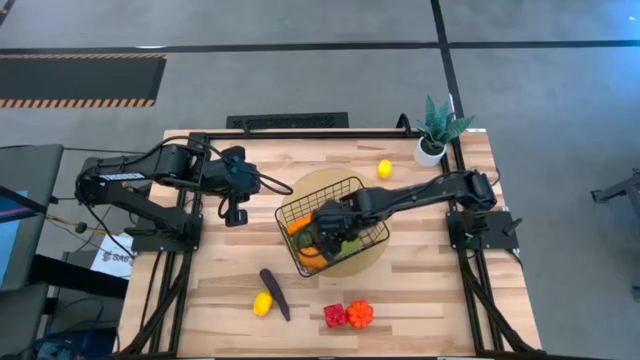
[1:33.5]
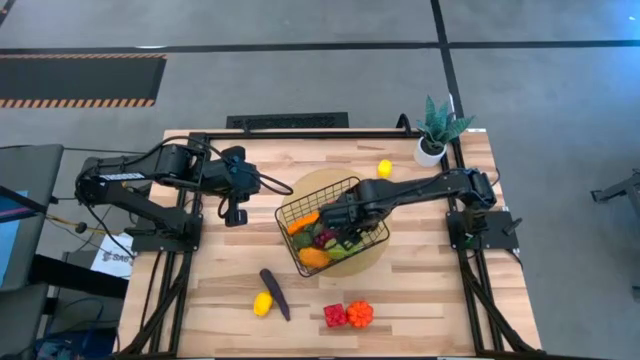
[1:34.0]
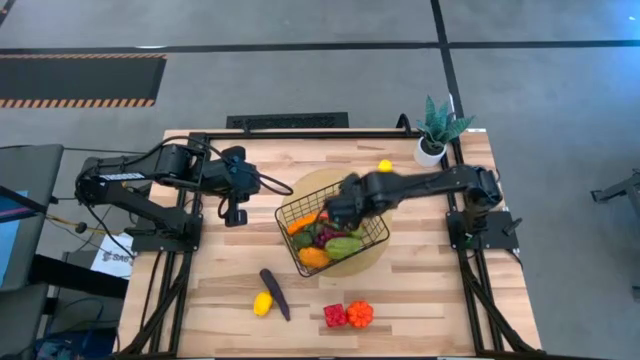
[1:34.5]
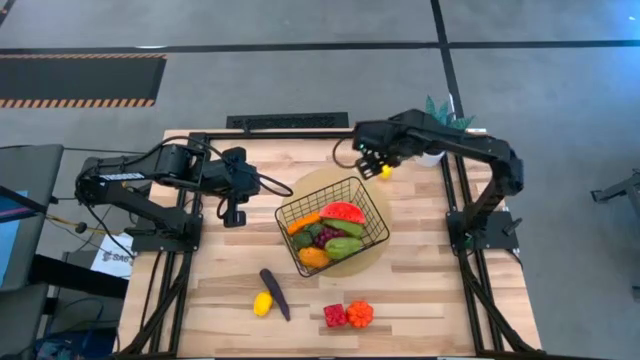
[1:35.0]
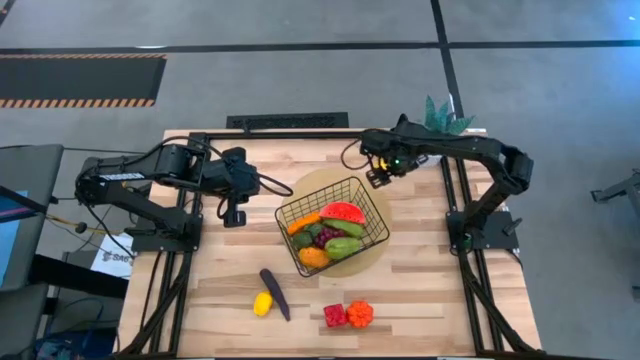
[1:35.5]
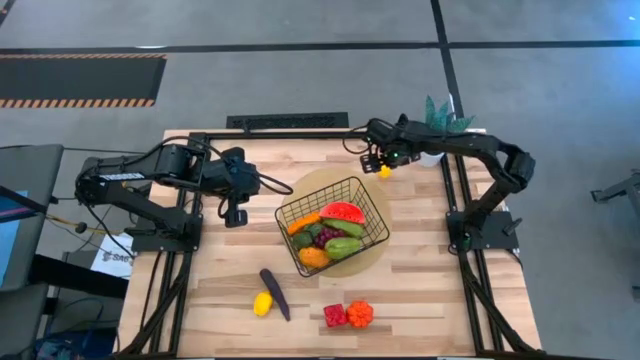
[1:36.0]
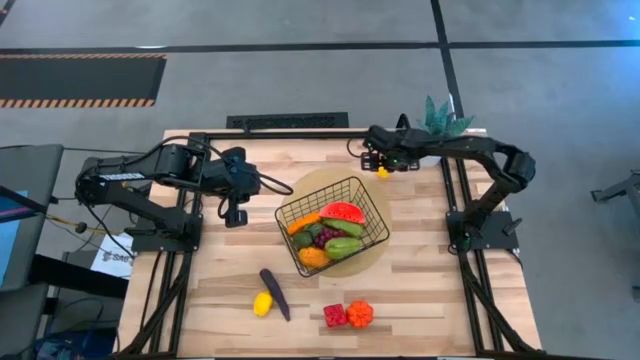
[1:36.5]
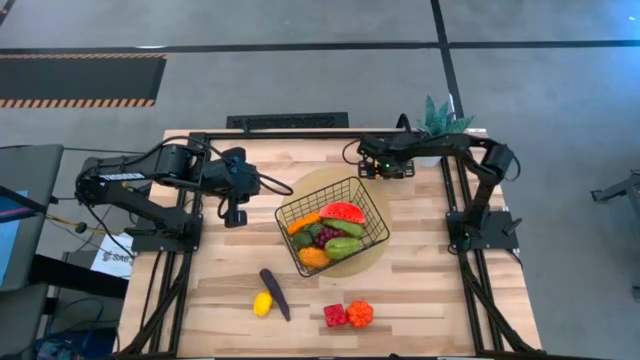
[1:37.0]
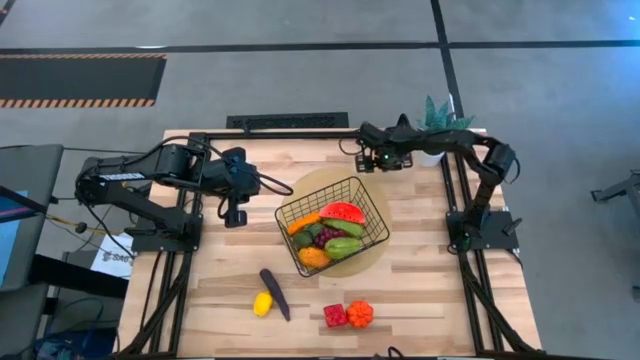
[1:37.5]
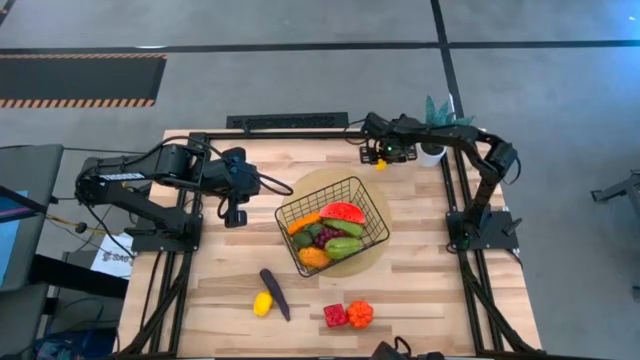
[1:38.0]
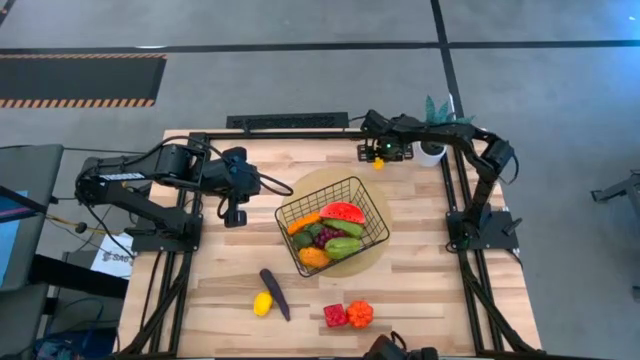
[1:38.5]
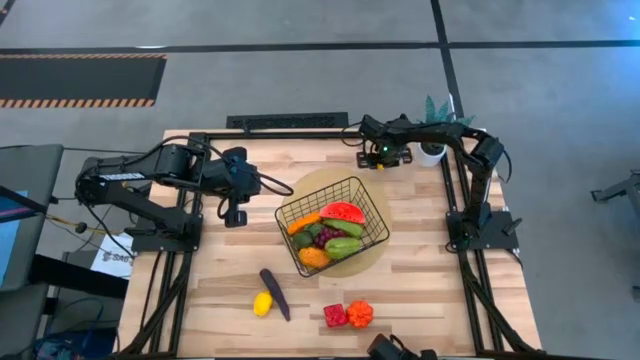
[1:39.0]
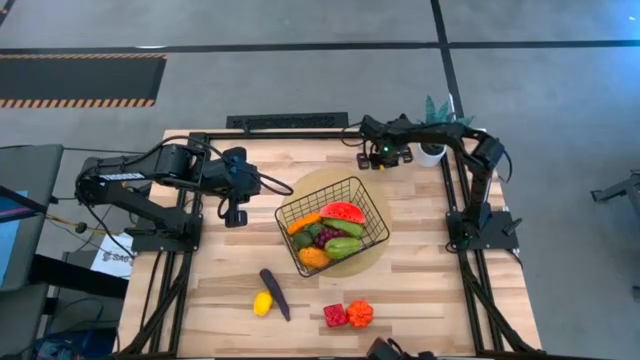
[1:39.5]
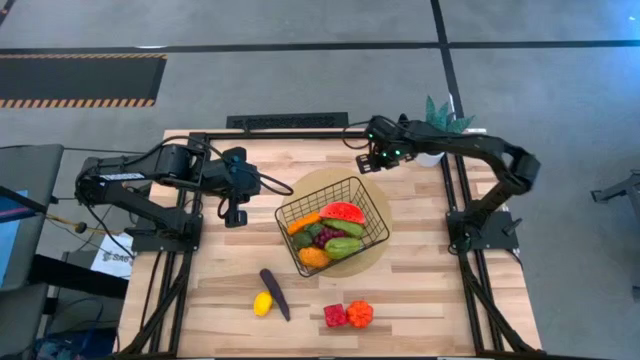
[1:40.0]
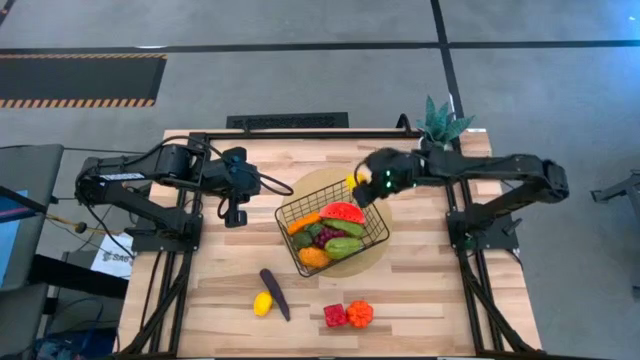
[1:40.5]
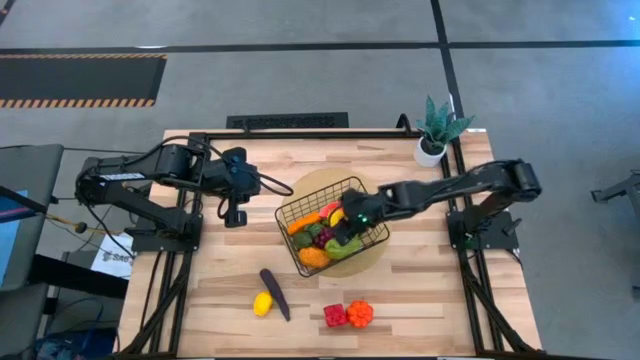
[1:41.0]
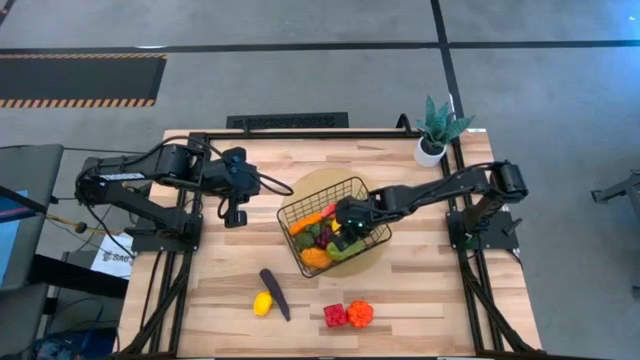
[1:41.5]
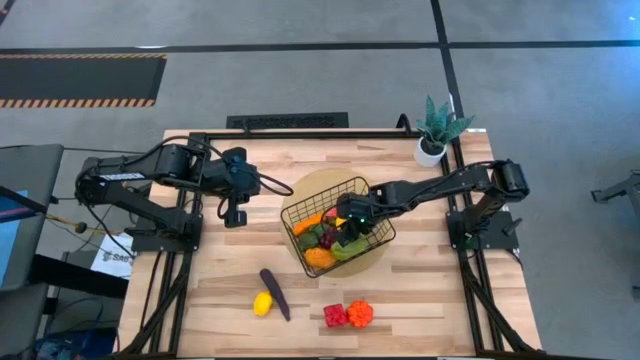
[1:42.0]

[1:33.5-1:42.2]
Task: Build produce basket
Put the top yellow lemon into the wire basket

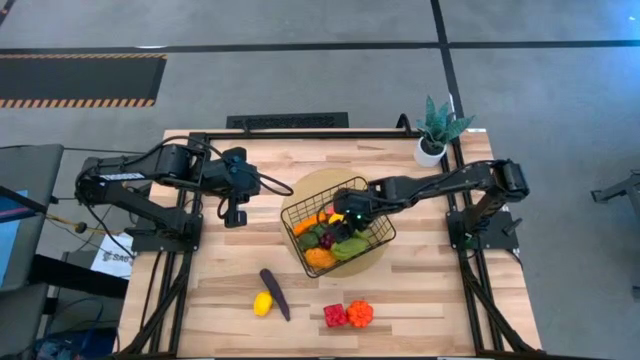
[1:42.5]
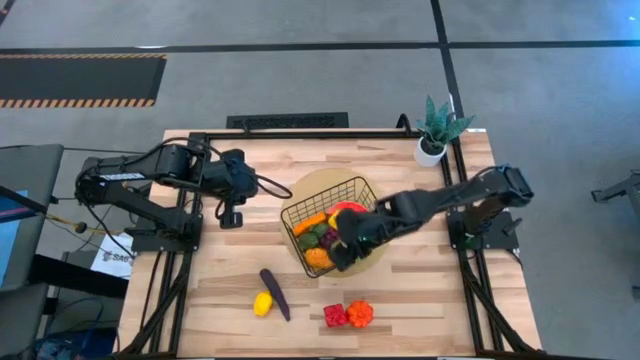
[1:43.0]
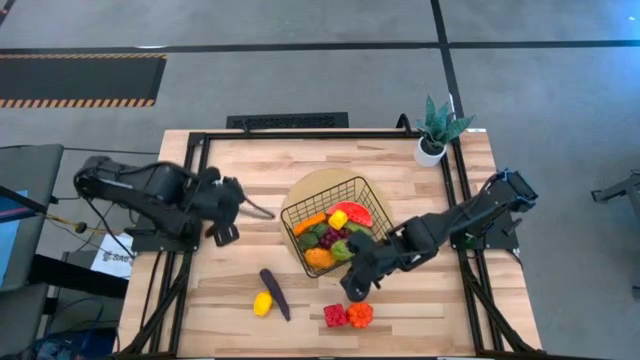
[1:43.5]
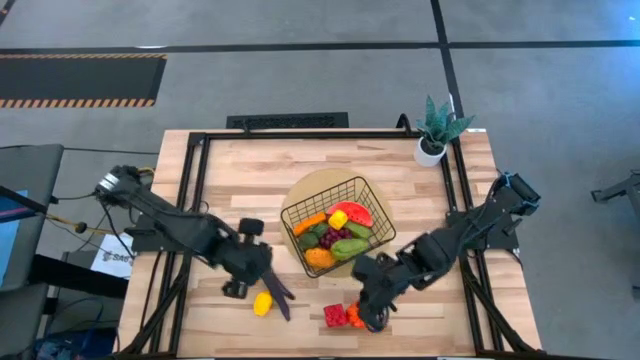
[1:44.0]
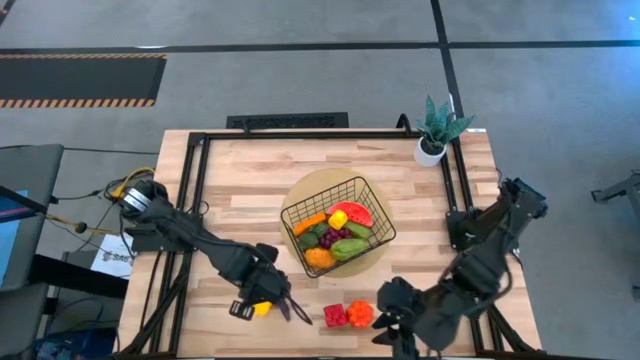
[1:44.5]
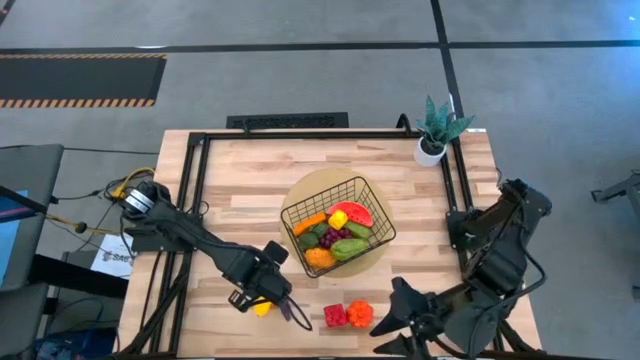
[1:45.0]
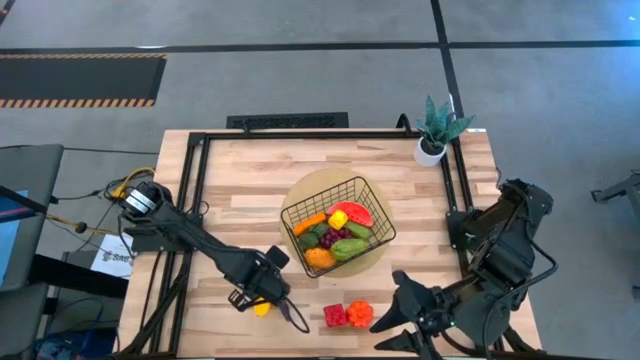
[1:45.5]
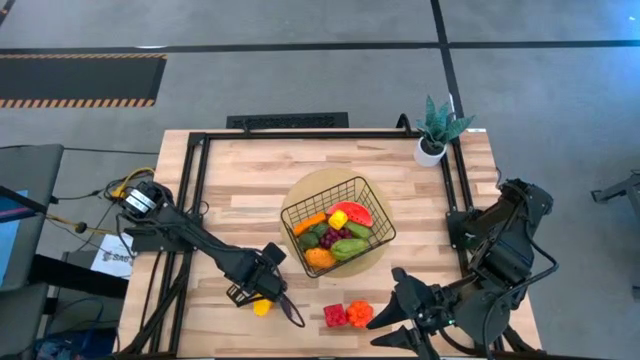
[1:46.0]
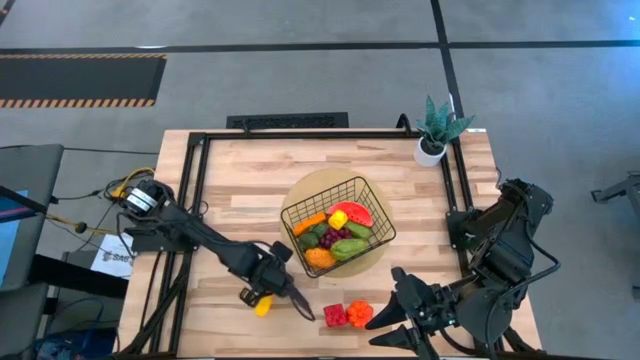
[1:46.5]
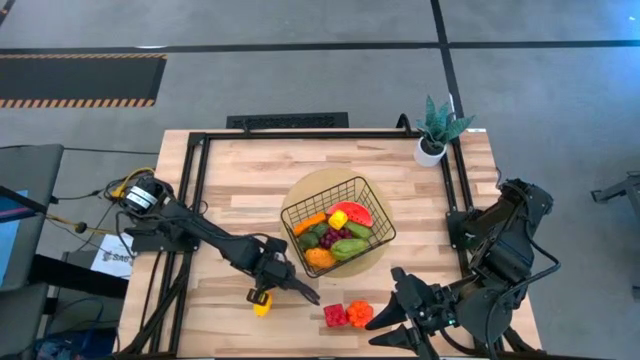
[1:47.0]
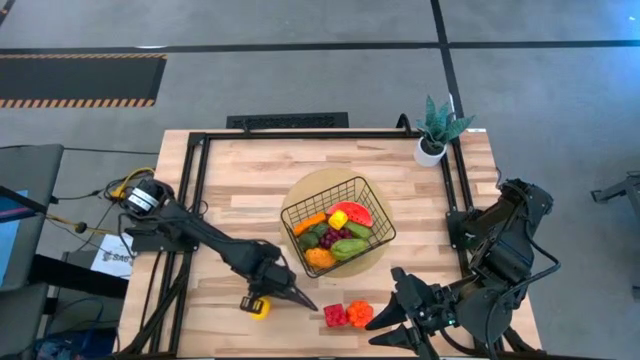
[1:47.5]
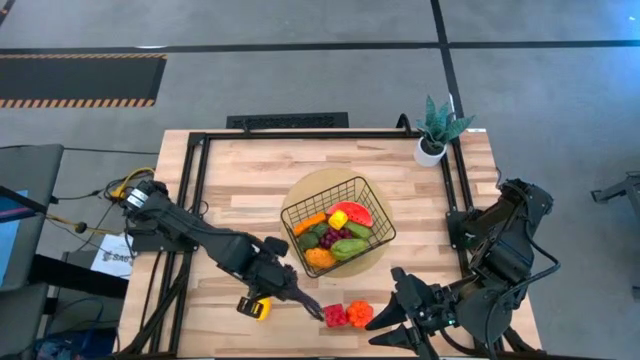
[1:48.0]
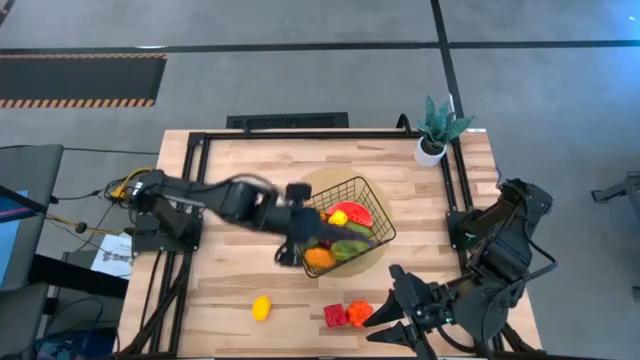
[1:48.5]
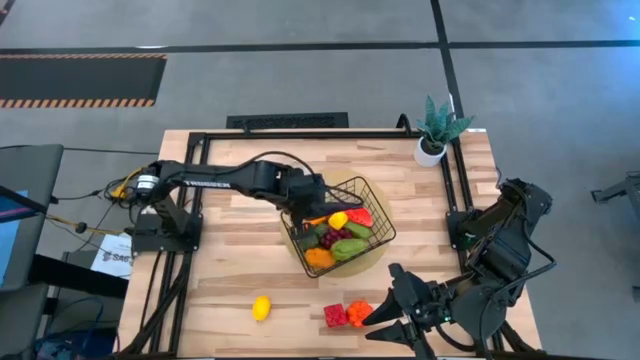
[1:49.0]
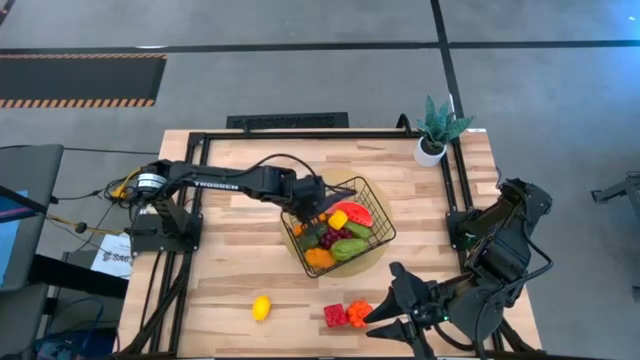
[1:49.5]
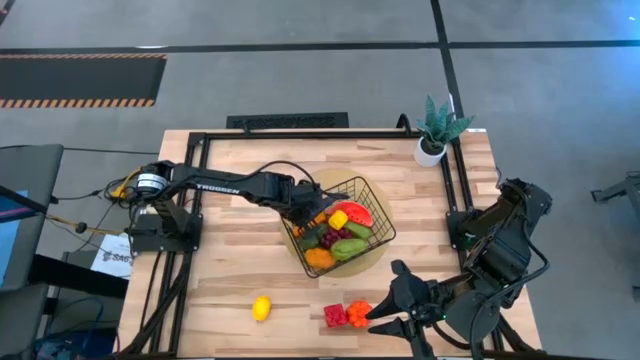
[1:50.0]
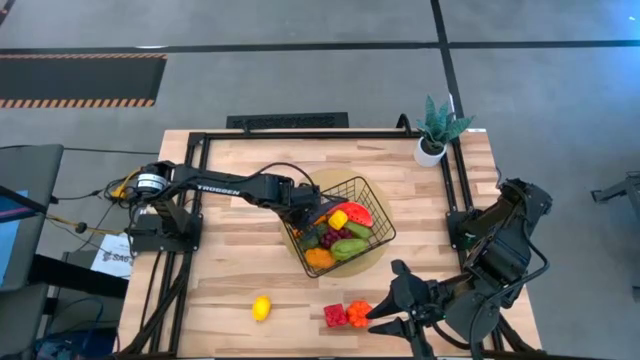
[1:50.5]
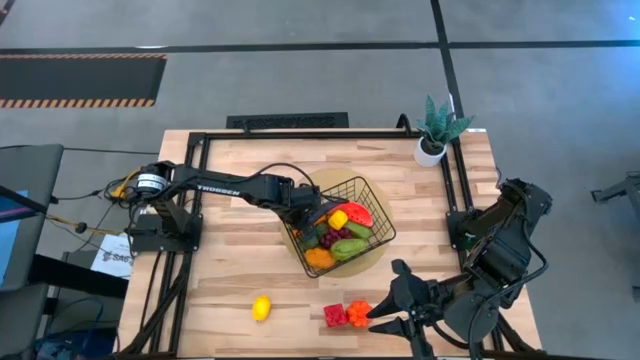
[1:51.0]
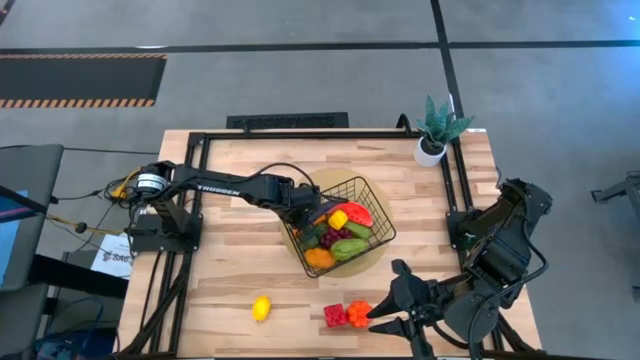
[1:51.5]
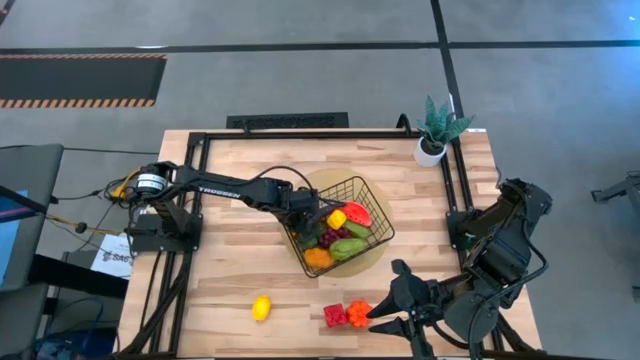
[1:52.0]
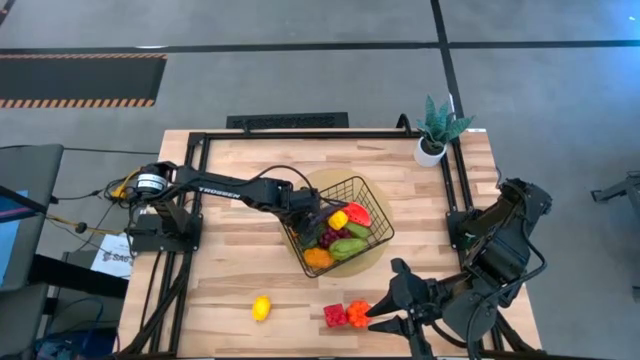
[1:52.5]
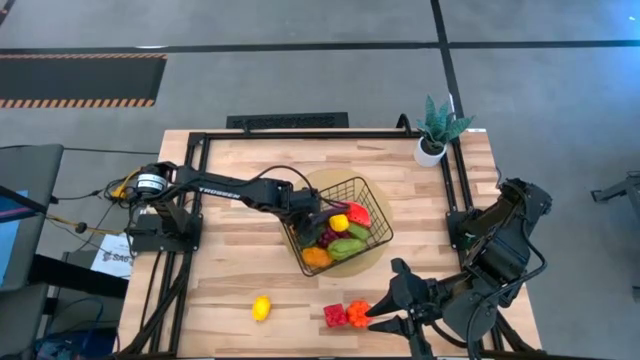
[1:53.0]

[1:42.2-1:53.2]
Put the purple eggplant into the wire basket

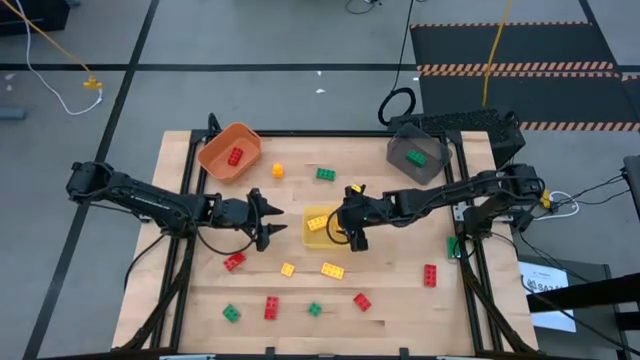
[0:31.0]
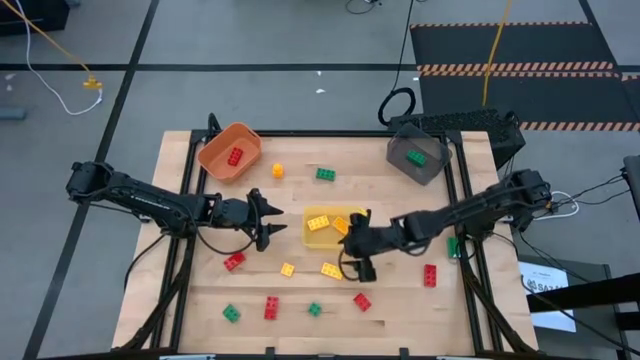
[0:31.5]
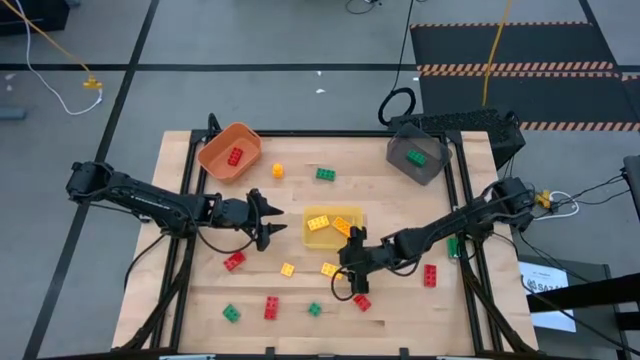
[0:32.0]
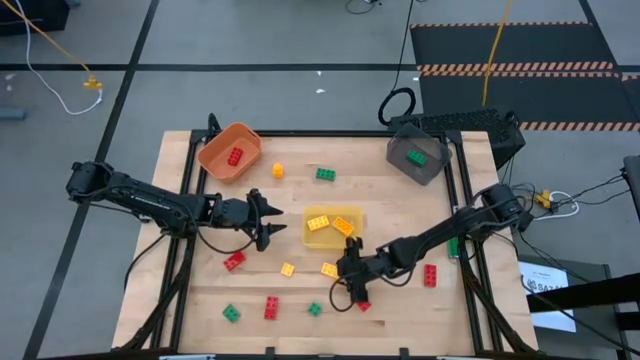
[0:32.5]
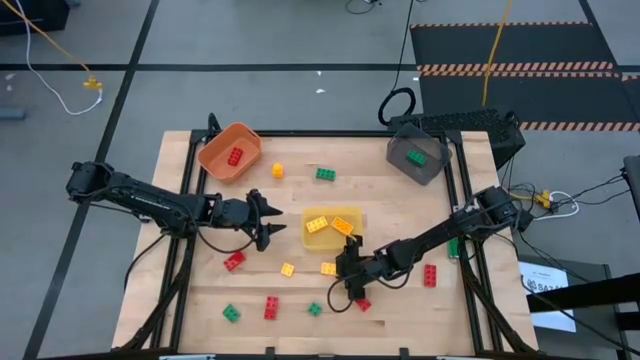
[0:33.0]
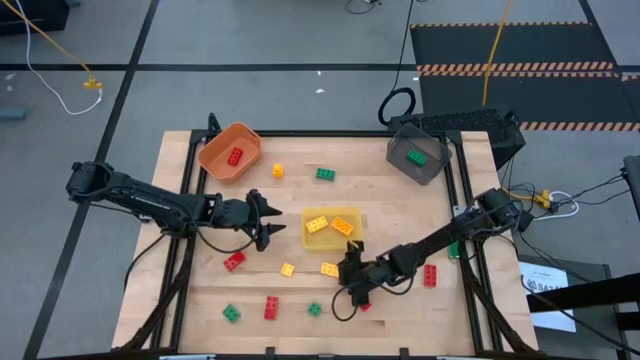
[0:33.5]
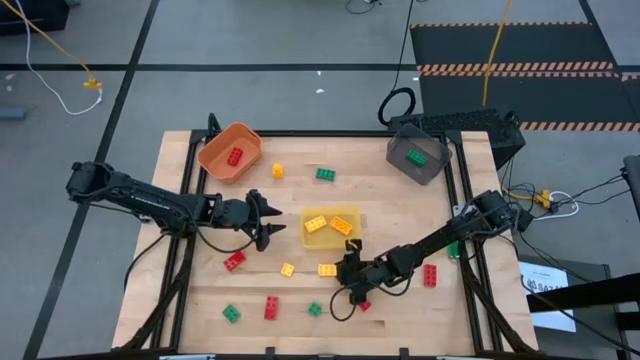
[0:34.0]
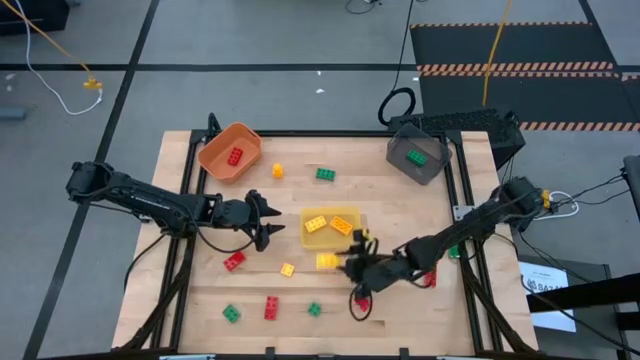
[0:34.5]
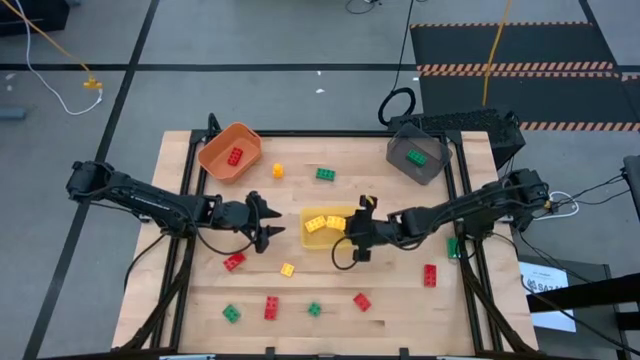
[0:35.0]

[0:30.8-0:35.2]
Task: Sort & place blocks by color
Put the bottom right yellow 8-stud game piece into the yellow bin
